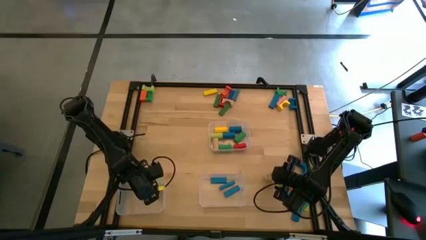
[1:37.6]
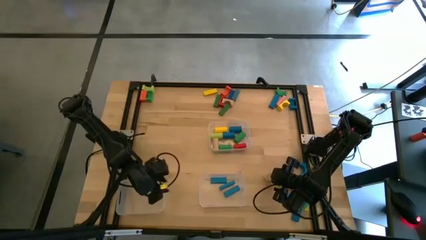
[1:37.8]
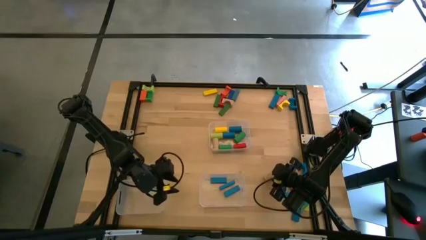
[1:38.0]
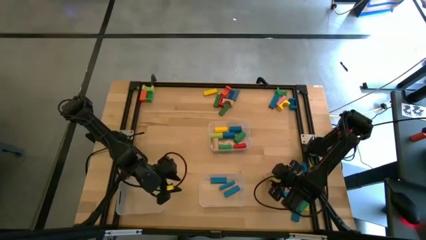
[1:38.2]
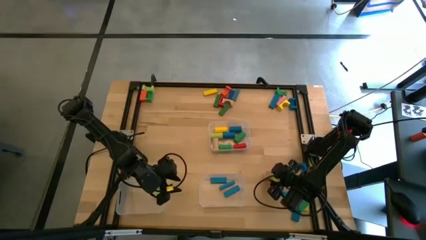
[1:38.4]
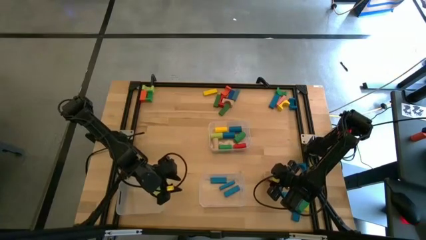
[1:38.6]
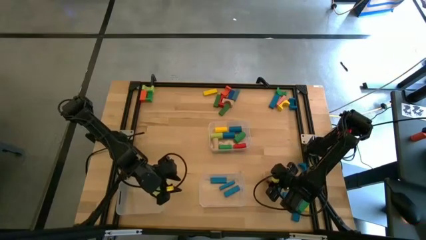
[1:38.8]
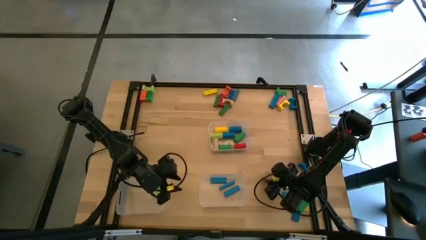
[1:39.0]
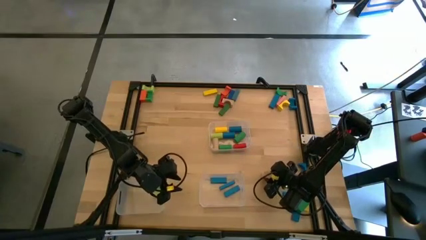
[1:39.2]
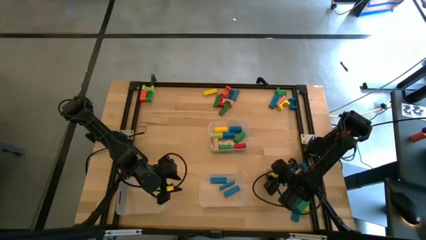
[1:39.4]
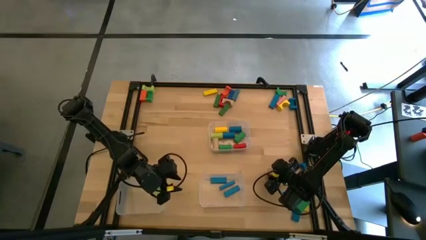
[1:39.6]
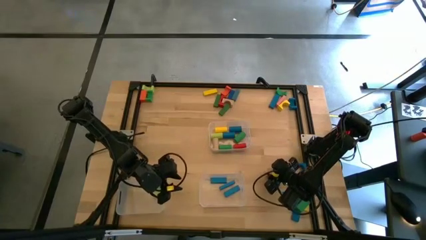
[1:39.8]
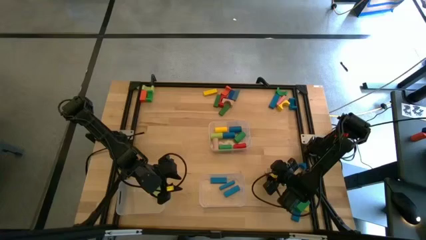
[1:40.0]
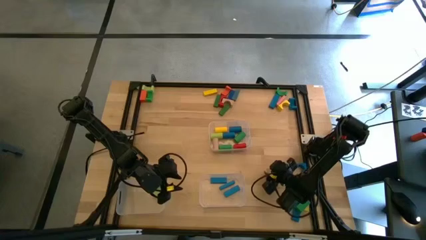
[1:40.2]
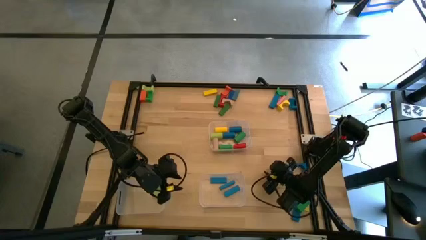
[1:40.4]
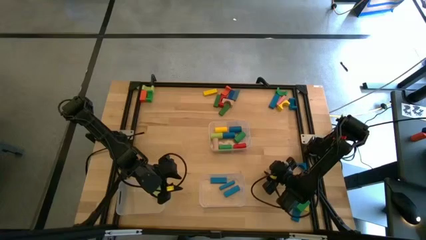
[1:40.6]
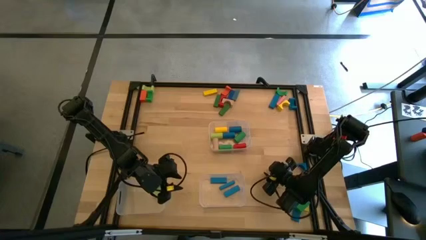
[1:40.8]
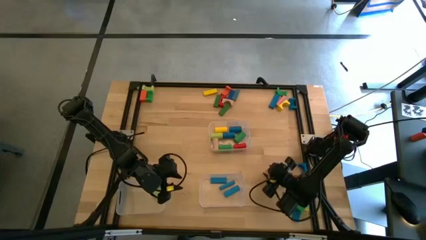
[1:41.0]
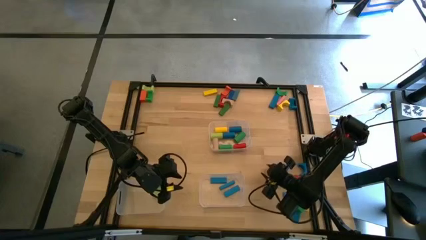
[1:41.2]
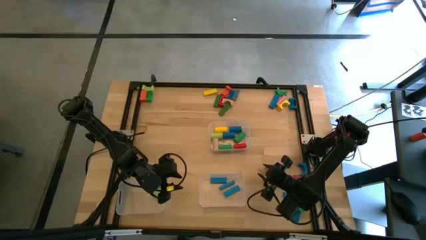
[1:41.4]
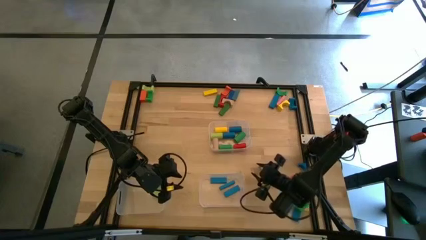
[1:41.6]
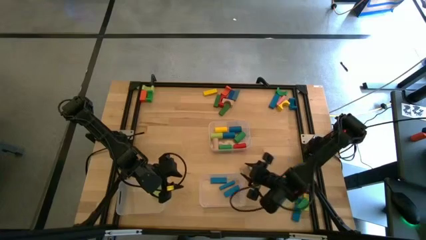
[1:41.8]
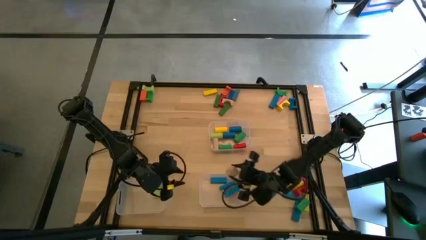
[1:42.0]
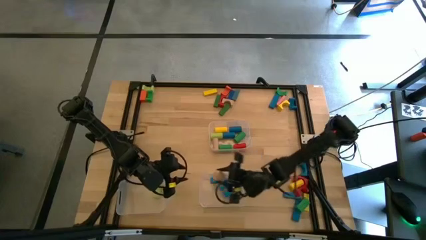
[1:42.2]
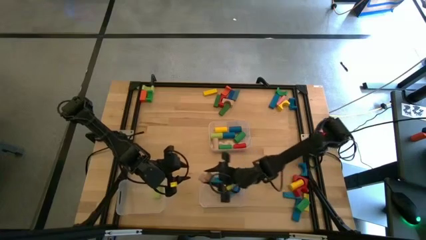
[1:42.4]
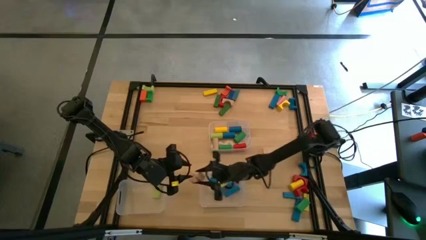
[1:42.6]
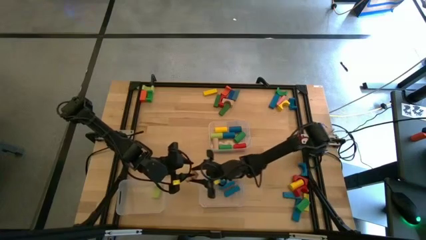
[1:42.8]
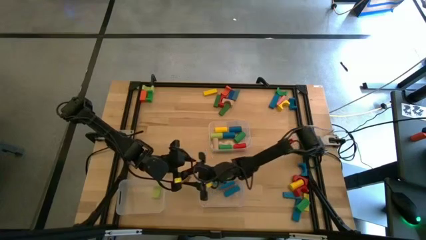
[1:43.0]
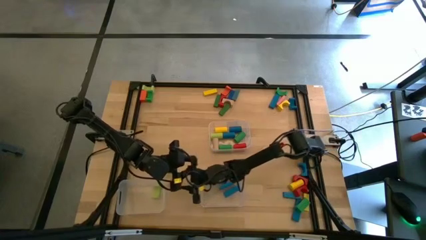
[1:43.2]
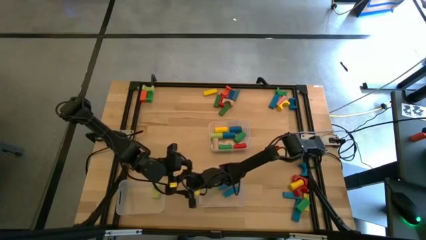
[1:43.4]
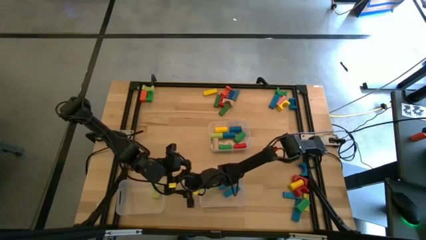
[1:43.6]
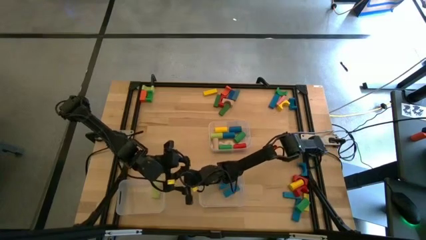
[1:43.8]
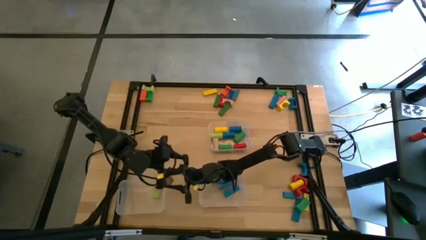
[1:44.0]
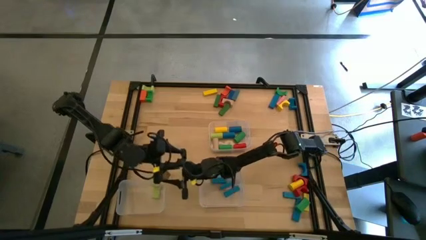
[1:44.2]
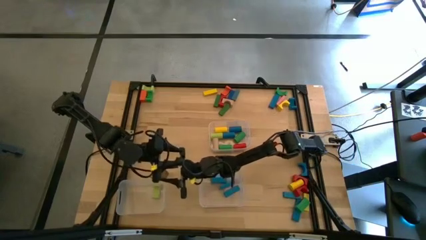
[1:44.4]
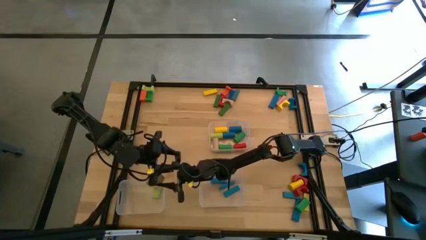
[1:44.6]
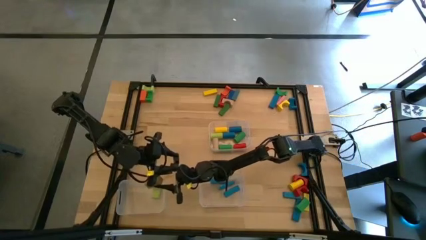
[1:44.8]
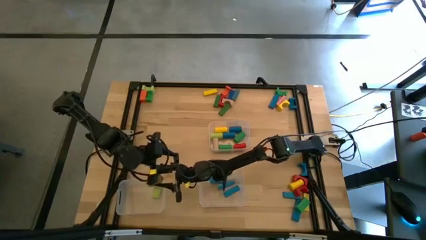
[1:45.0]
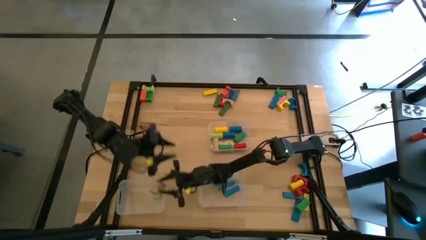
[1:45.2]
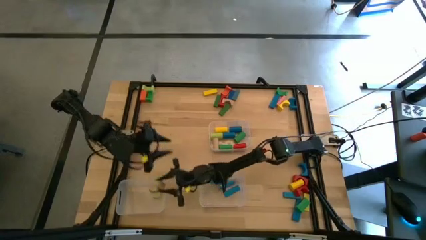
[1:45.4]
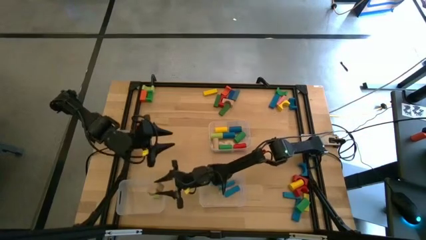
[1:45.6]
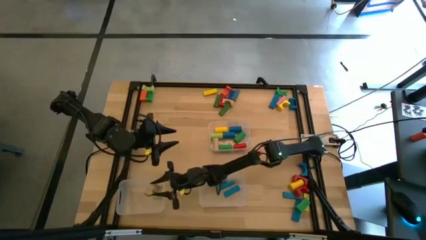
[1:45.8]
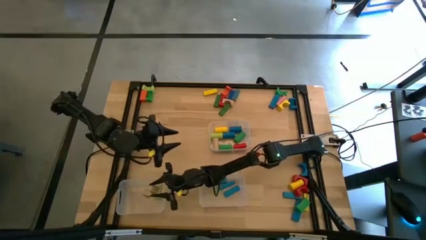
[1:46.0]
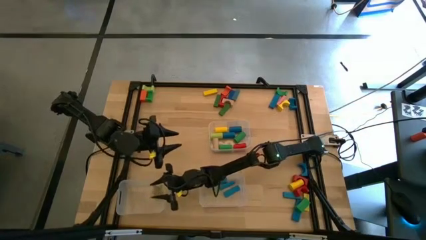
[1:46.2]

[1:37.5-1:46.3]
Task: Sort blocks by size
Put the brown arch block into the bottom left transparent bin

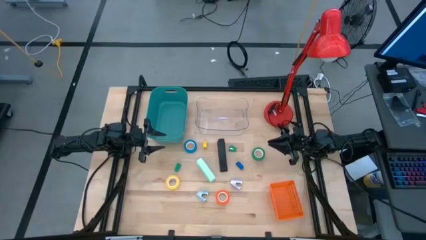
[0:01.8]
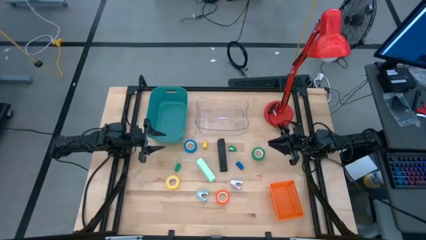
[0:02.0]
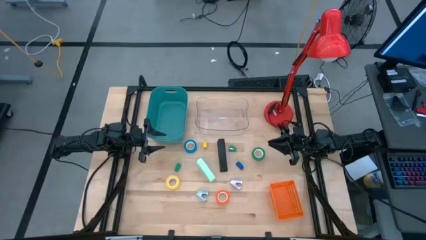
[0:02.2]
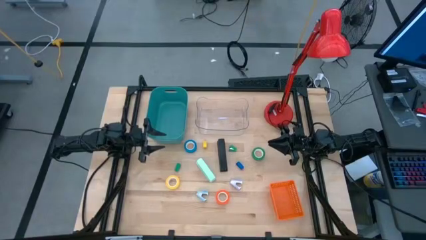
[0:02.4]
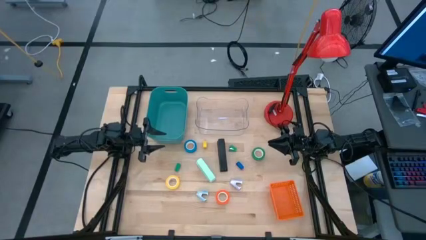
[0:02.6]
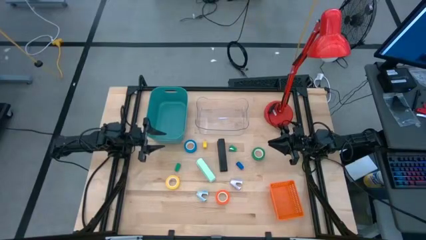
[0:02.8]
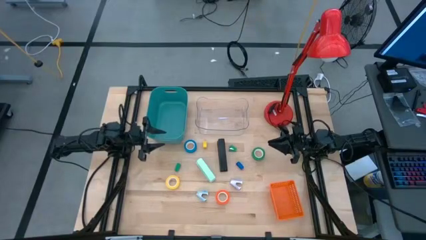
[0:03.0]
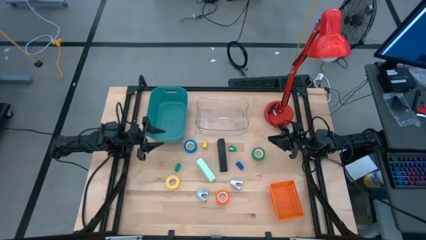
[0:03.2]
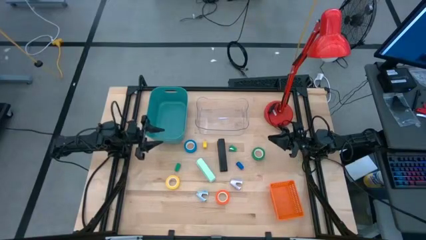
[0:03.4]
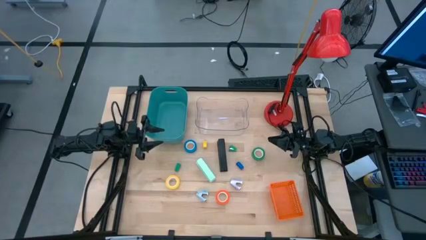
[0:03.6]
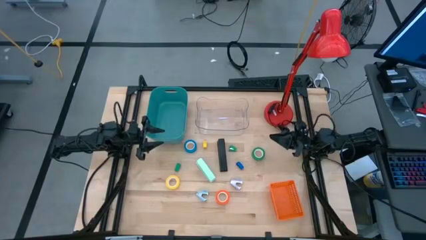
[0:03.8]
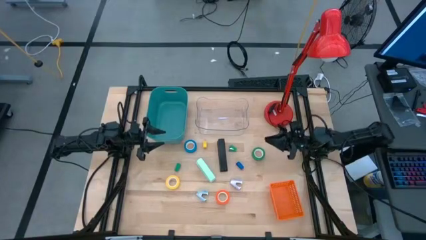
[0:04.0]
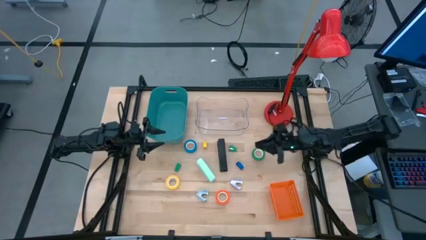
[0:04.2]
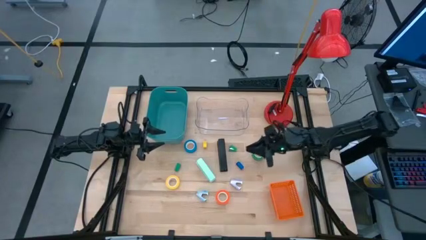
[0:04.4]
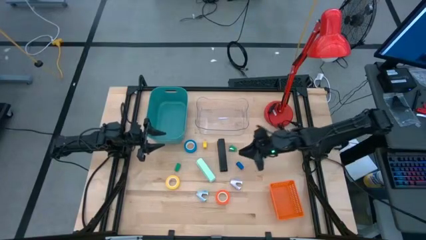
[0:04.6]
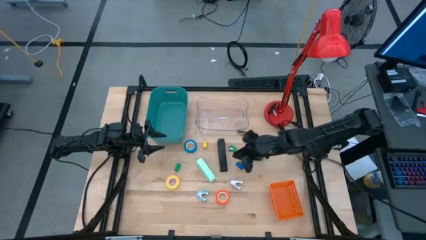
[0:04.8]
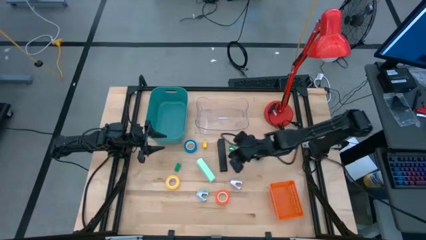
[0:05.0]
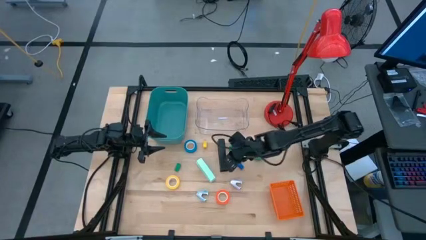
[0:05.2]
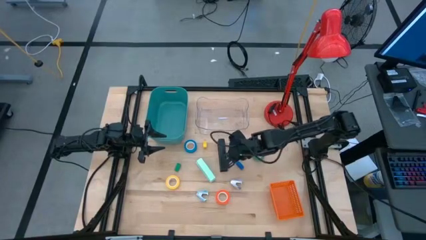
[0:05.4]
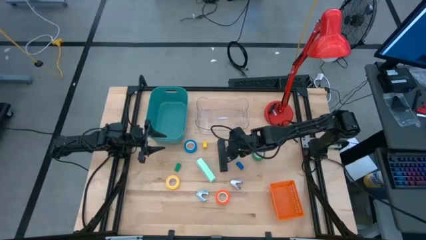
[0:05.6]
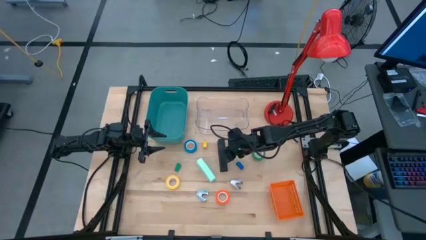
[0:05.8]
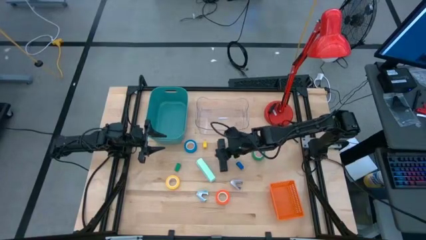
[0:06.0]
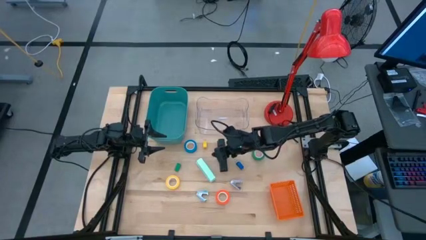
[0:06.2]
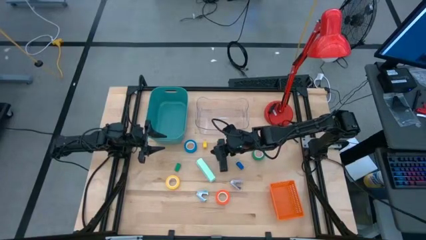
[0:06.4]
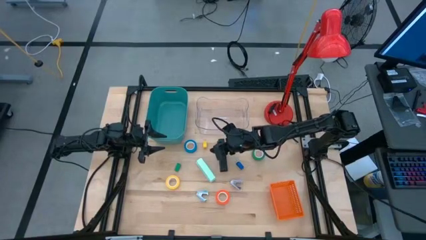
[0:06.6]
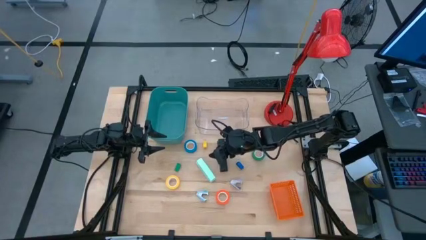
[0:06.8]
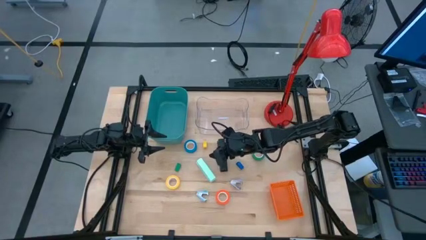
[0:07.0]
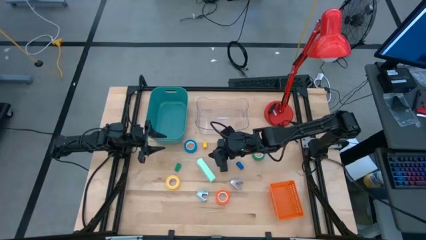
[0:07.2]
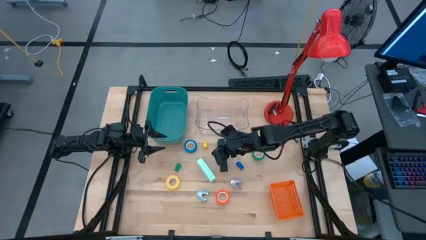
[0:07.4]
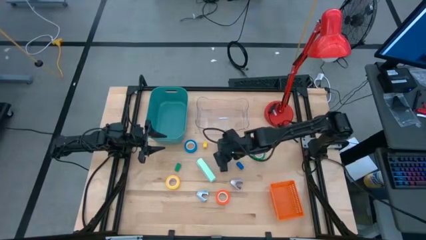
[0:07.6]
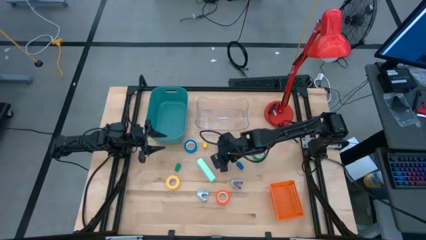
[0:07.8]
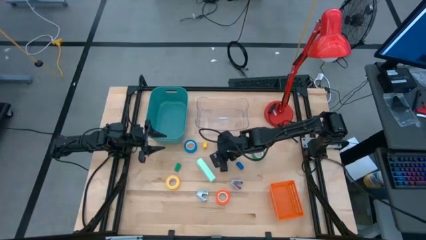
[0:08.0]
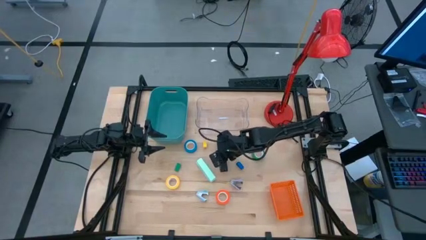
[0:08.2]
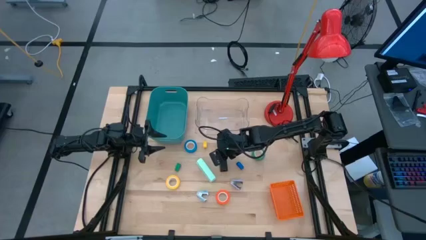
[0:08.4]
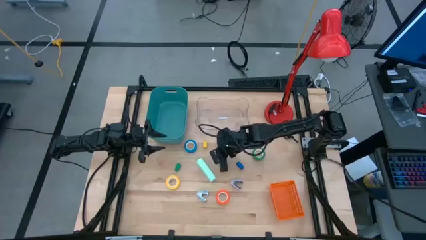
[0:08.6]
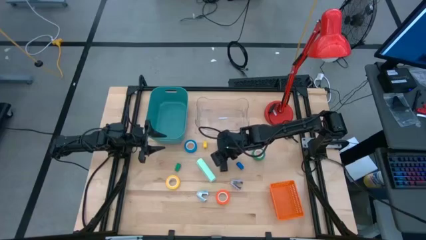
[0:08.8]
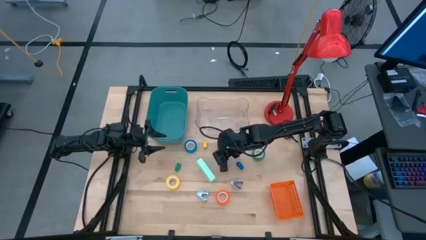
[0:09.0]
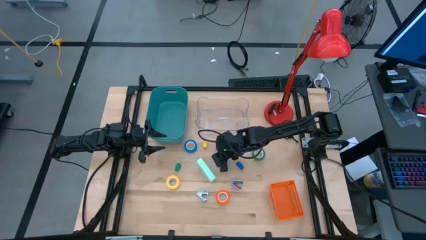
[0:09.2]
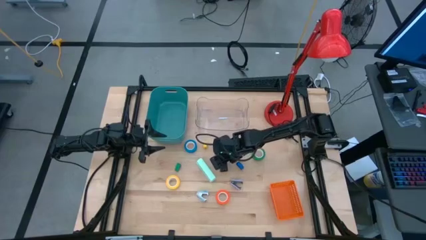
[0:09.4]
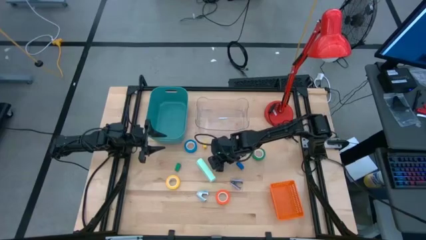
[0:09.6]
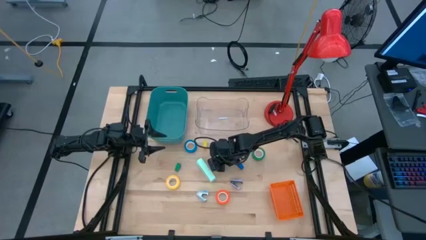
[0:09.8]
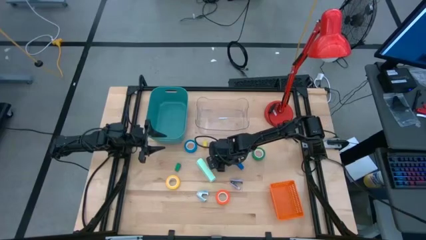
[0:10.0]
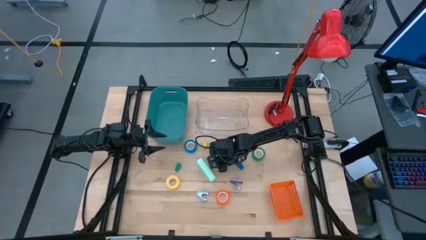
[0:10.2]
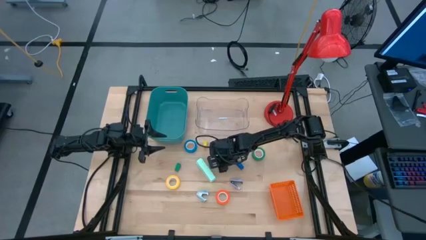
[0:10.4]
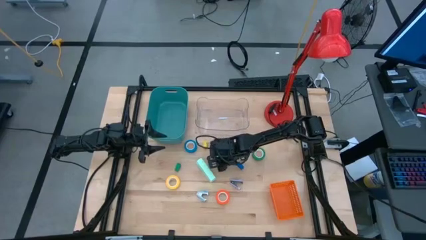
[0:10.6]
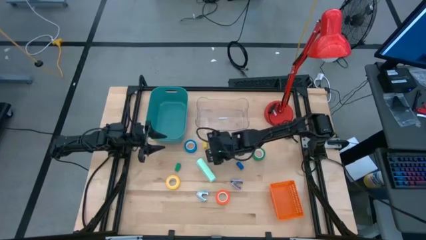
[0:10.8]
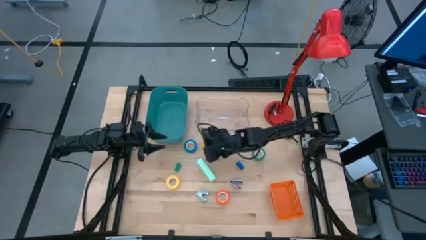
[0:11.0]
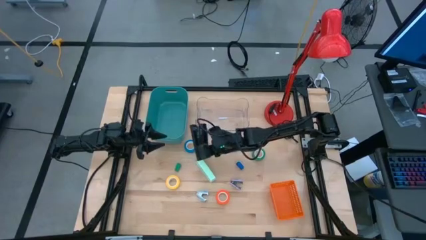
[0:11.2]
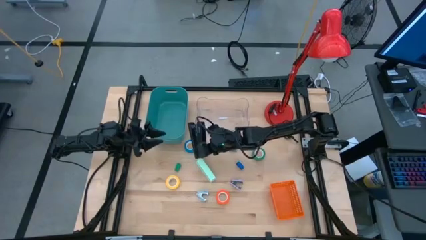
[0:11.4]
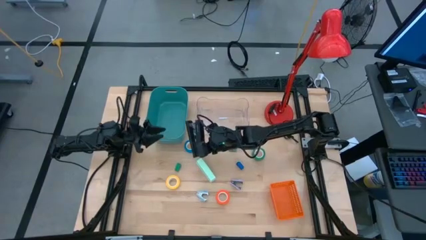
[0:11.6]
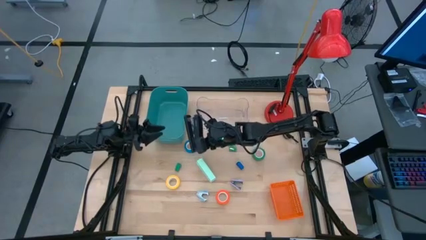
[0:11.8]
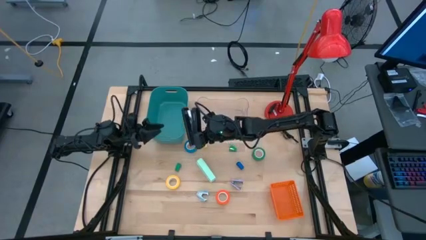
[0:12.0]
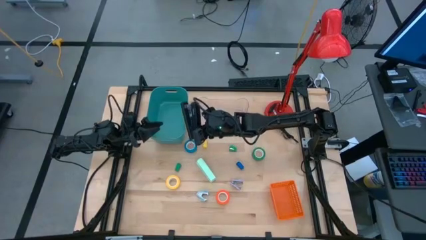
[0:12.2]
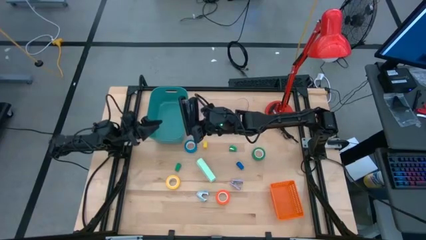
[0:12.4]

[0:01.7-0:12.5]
Task: Pick and place Stapler, Stapler remover, tape
Put the black stapler into the green bin
